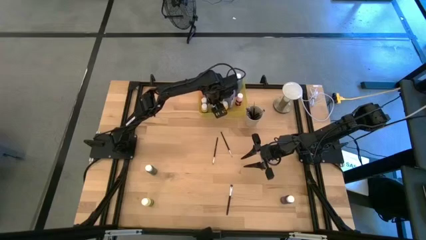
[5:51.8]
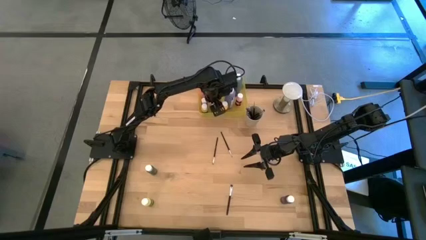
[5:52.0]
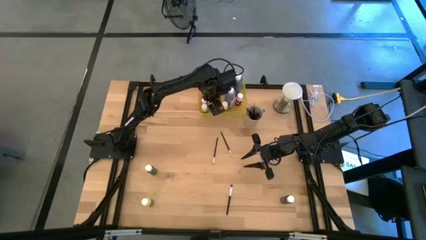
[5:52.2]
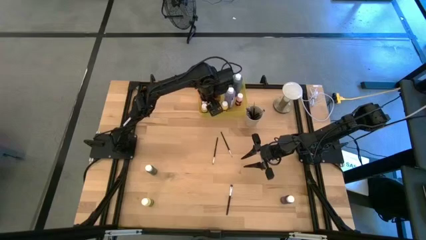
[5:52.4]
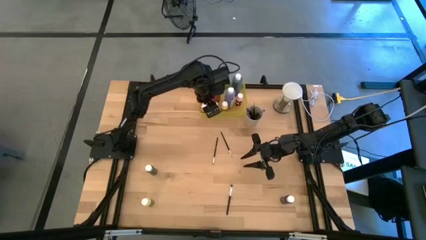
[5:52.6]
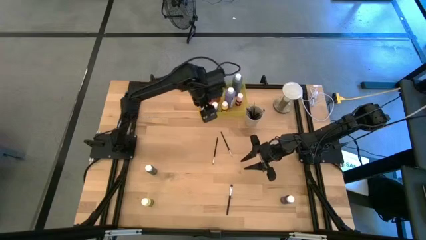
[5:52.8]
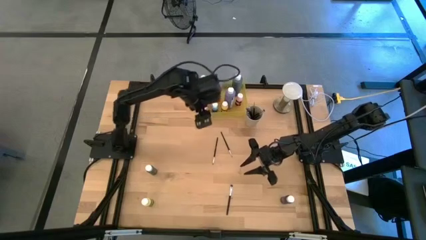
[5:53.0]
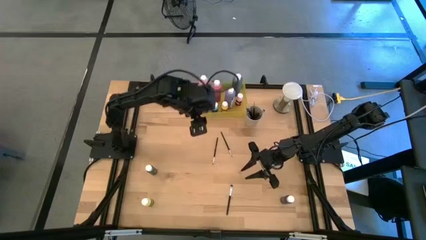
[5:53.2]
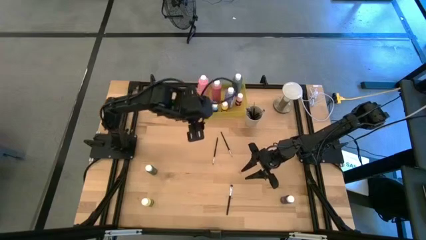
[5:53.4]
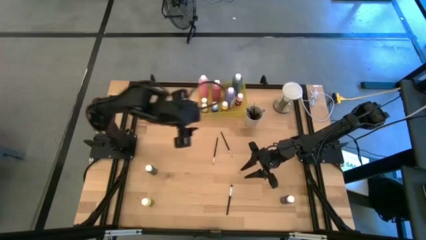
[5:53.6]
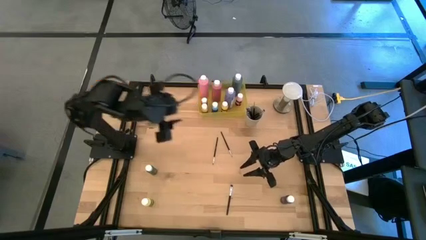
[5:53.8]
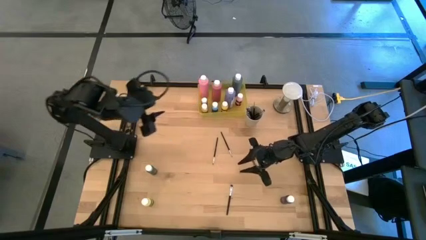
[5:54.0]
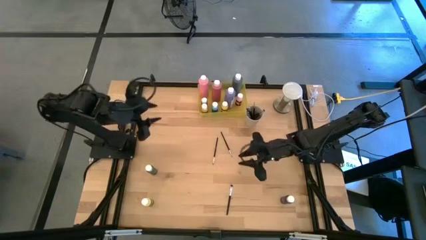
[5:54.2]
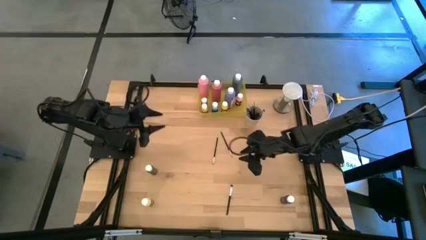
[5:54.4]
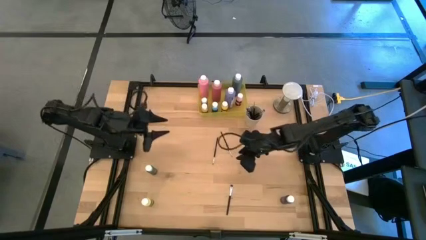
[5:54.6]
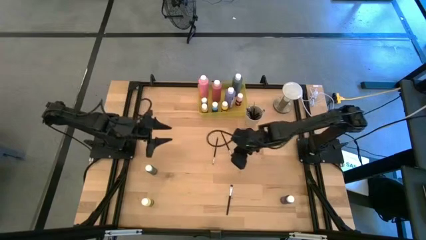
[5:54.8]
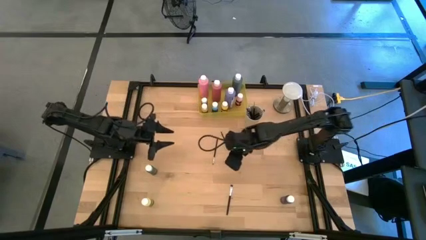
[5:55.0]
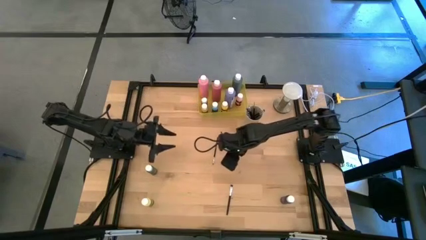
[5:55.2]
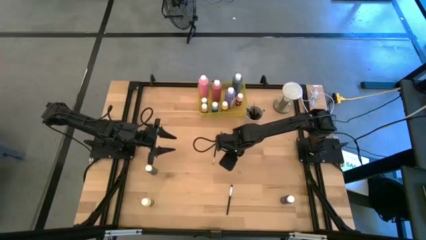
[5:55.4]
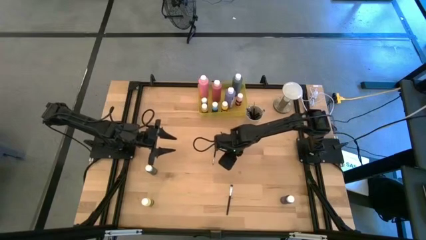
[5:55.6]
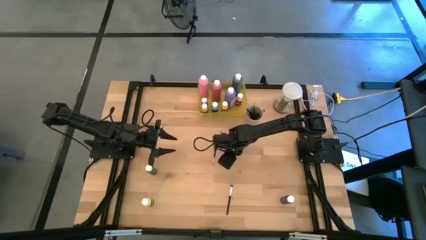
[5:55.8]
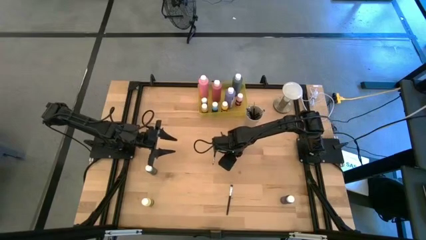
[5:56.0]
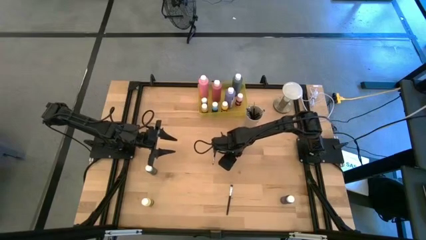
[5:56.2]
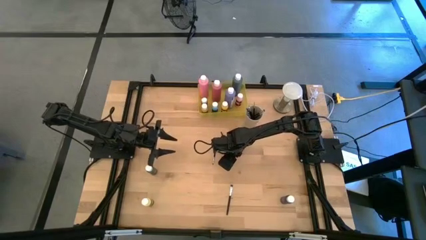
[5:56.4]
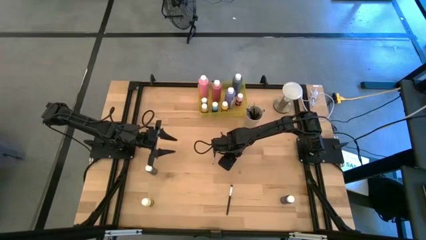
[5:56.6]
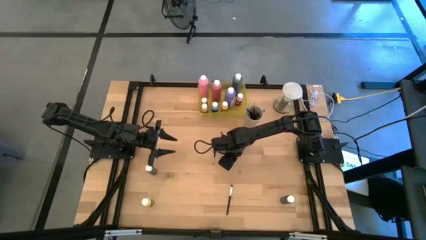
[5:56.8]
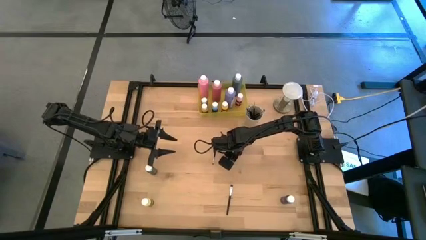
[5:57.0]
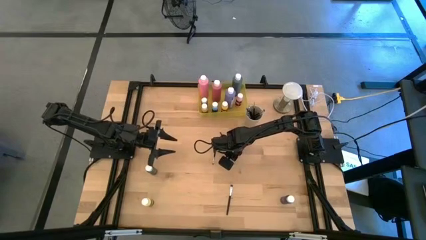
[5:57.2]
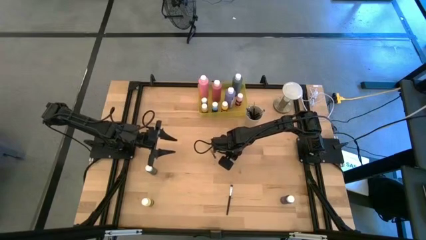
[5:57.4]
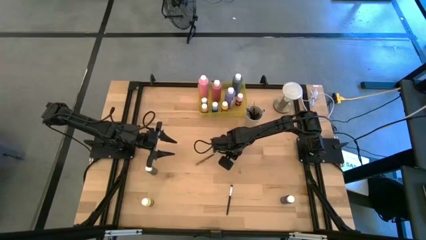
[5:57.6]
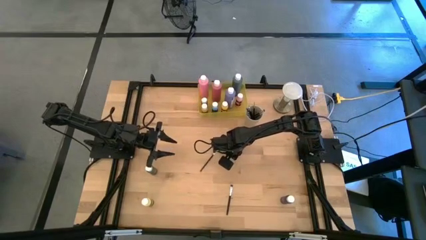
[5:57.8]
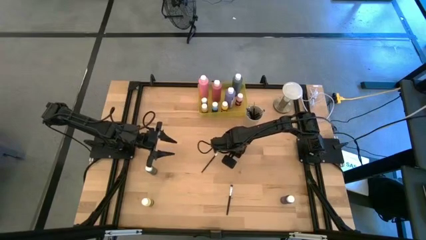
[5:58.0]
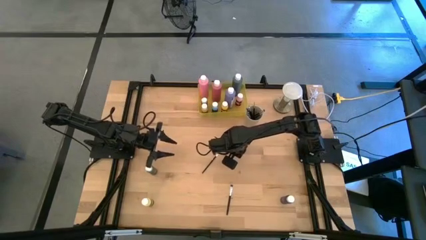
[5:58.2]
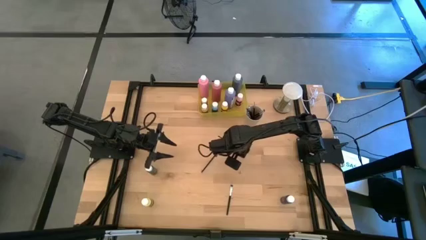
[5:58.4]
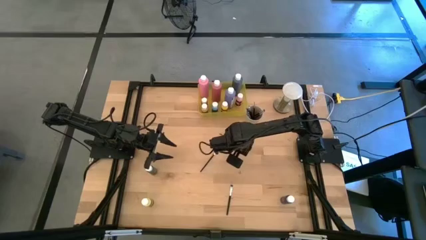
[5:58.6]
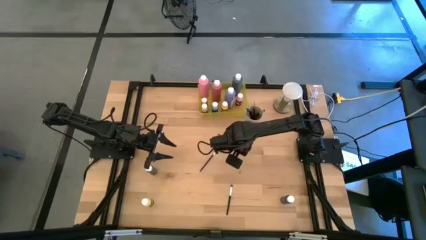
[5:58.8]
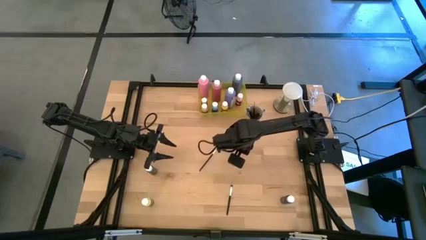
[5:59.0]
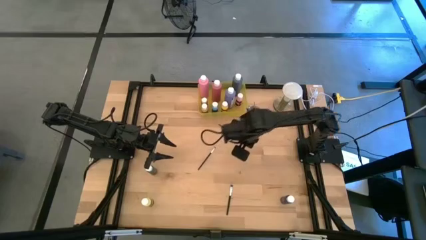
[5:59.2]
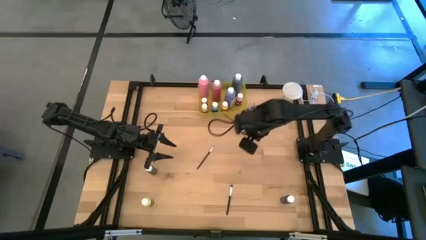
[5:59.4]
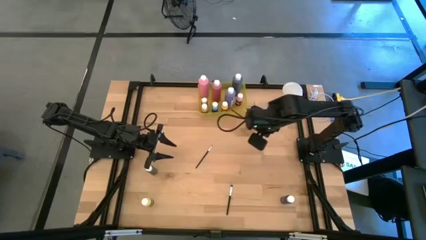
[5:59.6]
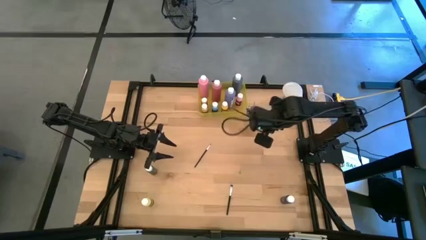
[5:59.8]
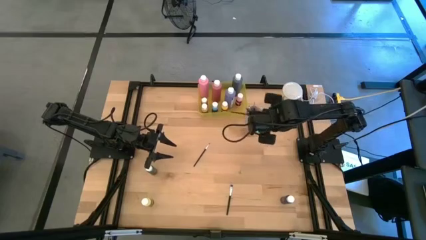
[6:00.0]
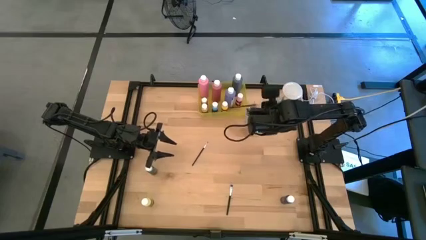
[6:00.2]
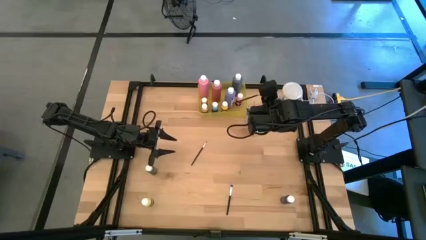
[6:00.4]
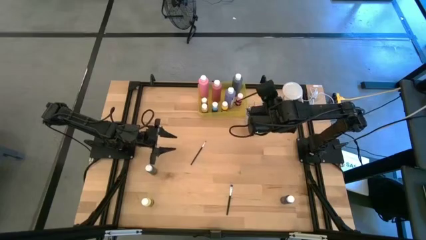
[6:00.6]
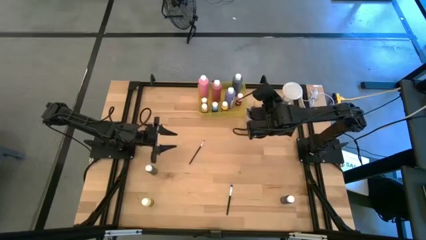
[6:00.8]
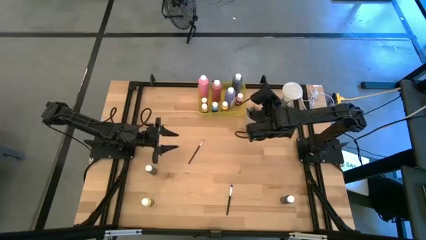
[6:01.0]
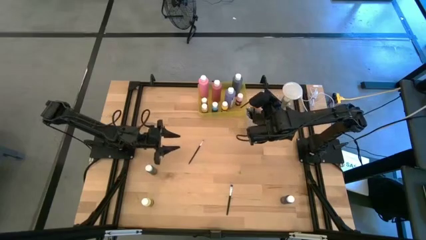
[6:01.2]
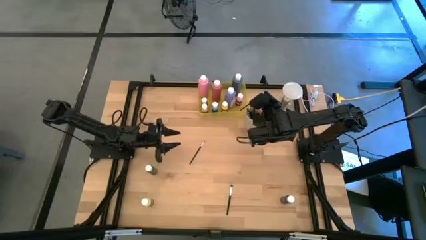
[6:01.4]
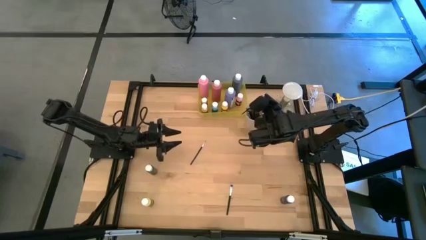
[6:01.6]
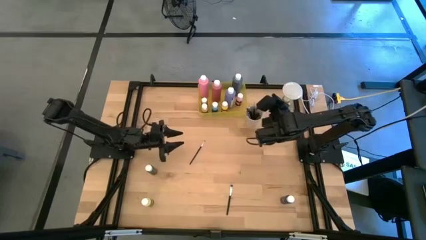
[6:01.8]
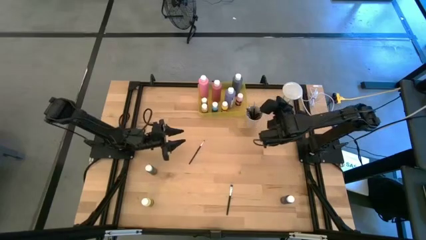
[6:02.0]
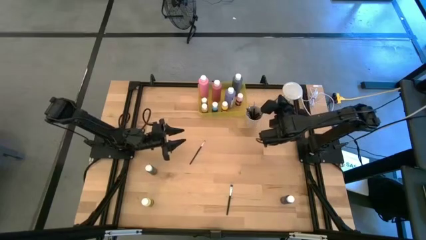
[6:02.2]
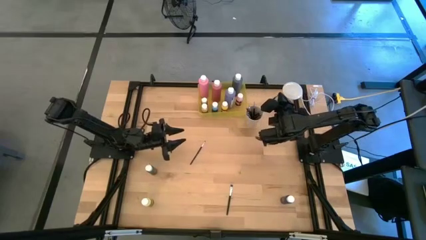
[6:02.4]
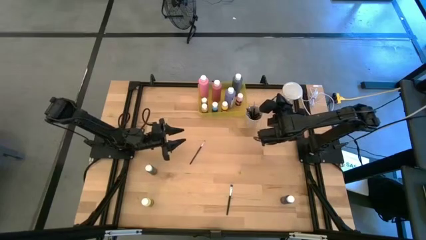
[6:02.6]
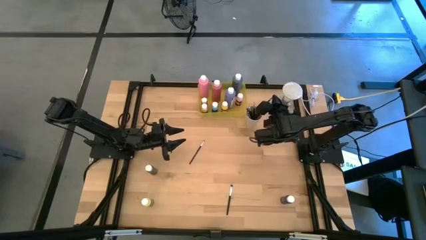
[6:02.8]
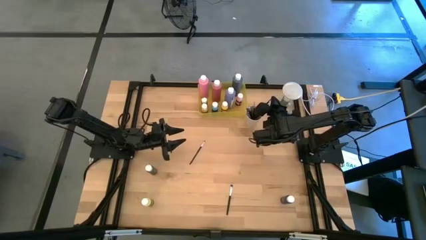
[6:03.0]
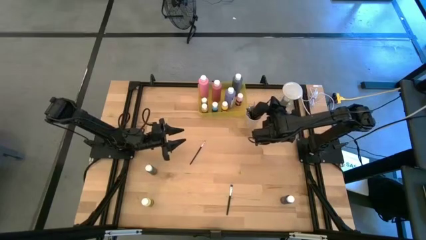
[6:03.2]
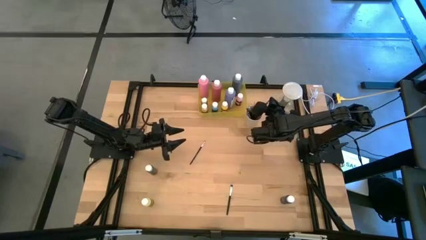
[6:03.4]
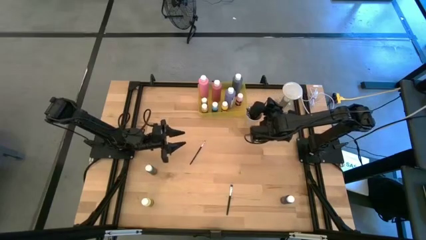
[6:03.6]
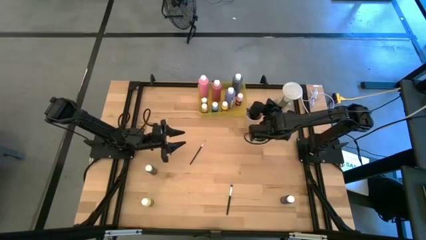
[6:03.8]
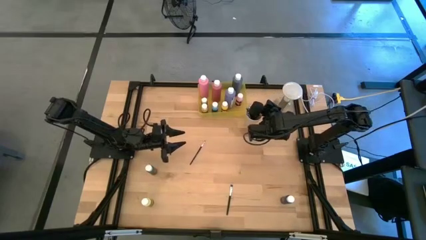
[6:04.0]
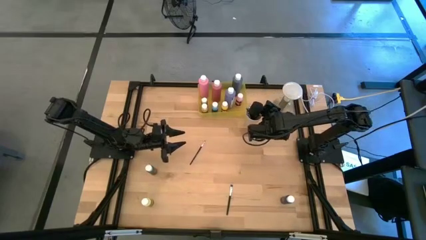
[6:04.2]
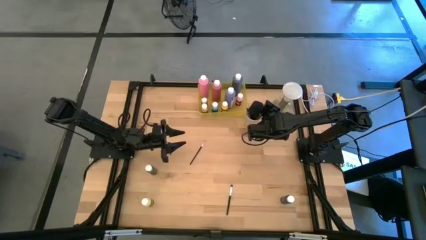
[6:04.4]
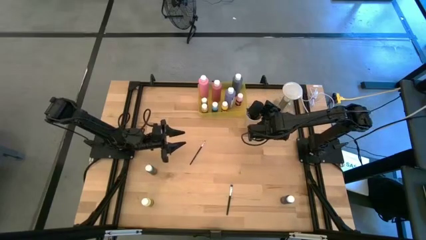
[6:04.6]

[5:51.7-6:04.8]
Task: Pick & Place Paint Supplies
Put the silver paint brush into the white cup
